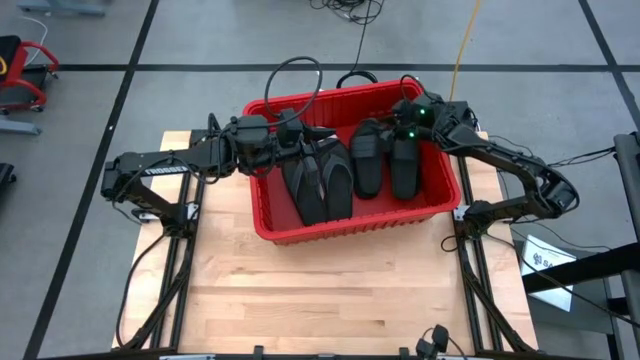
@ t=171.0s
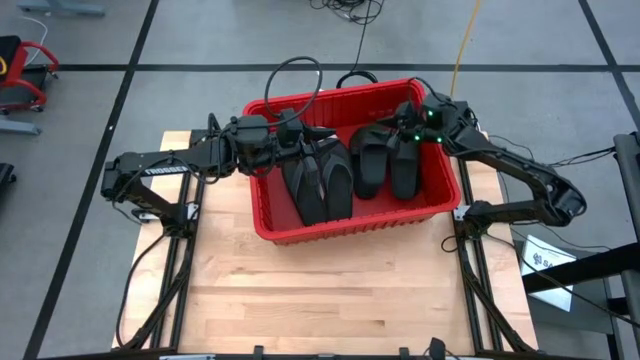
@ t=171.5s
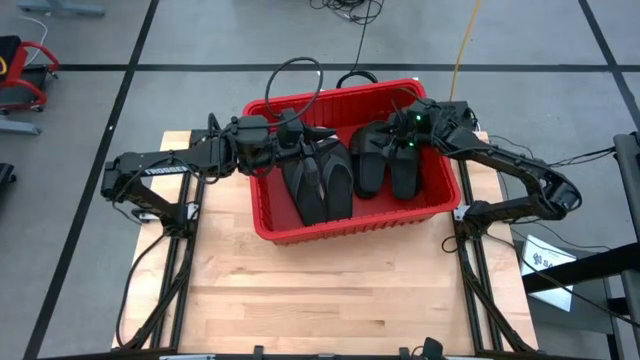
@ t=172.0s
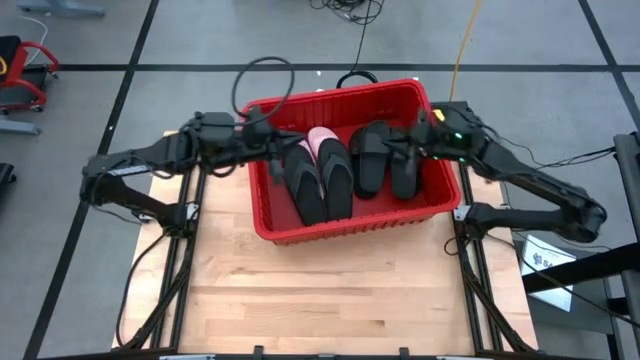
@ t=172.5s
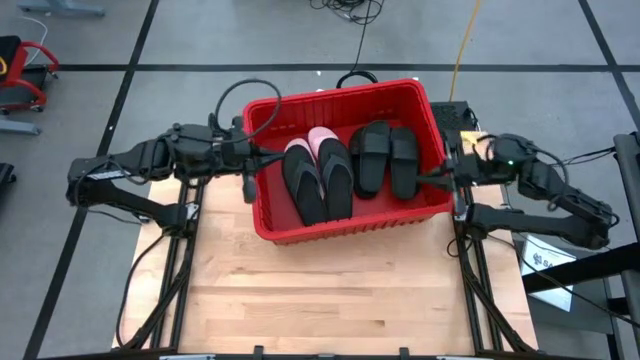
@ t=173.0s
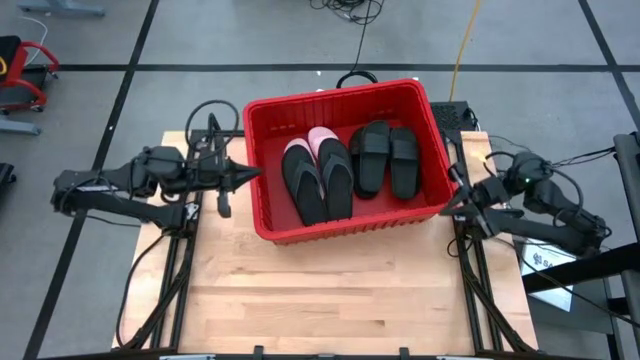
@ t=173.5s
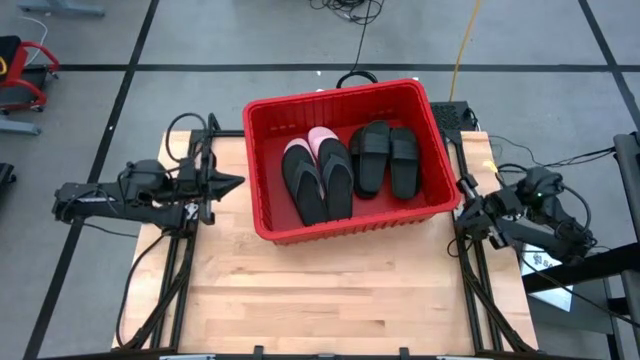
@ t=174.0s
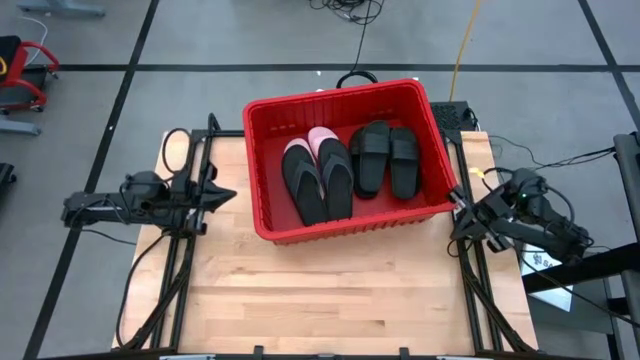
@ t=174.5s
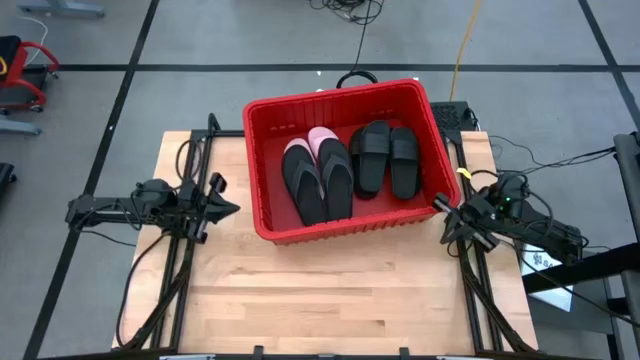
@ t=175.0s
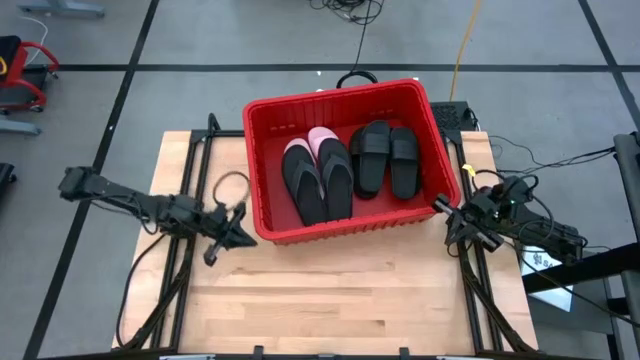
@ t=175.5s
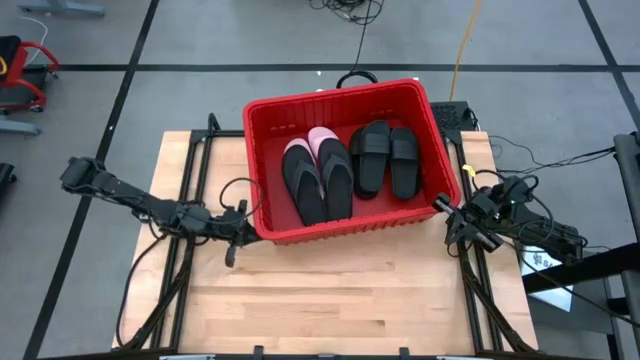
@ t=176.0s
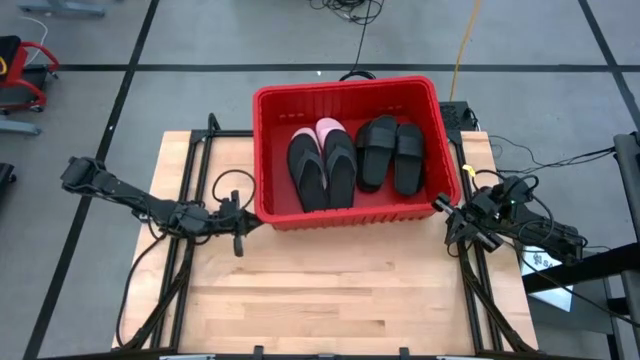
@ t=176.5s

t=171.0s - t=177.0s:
Task: Pick and place slides into bin
Adjust the red bin

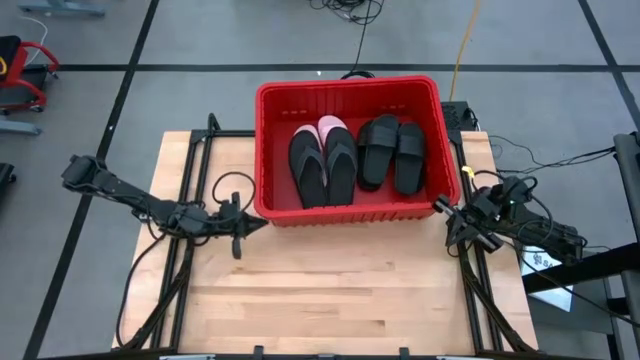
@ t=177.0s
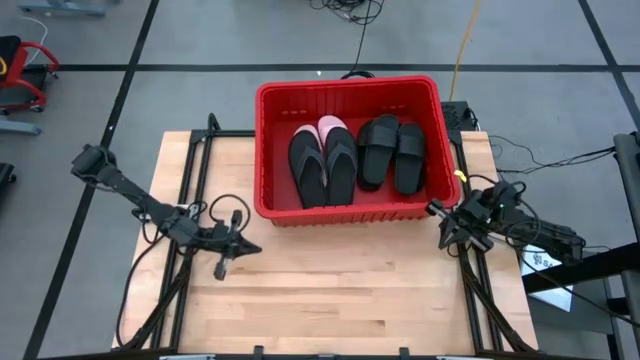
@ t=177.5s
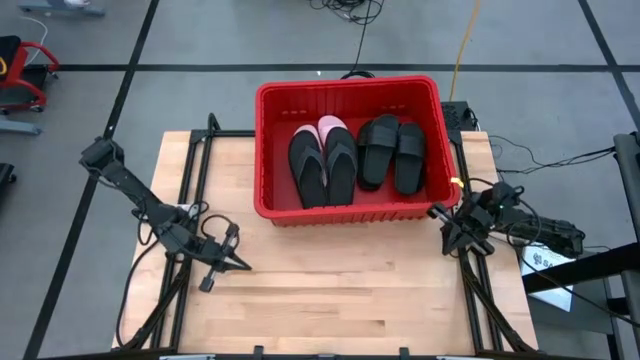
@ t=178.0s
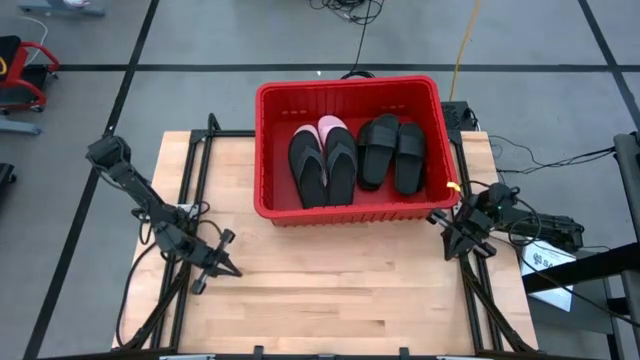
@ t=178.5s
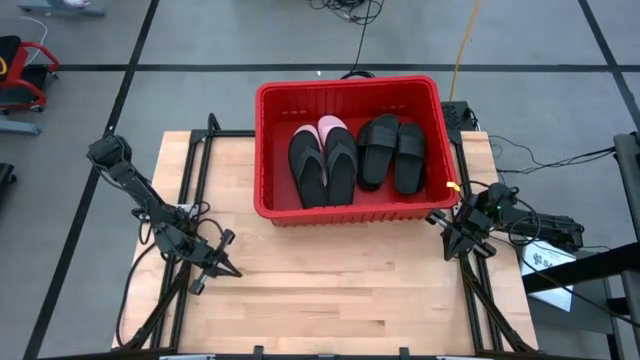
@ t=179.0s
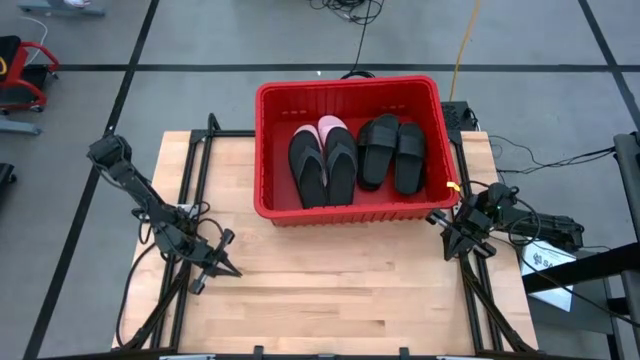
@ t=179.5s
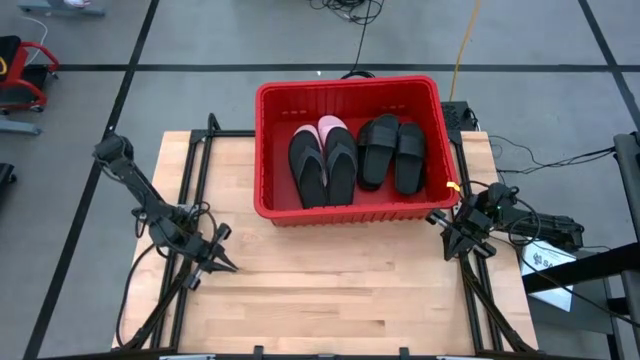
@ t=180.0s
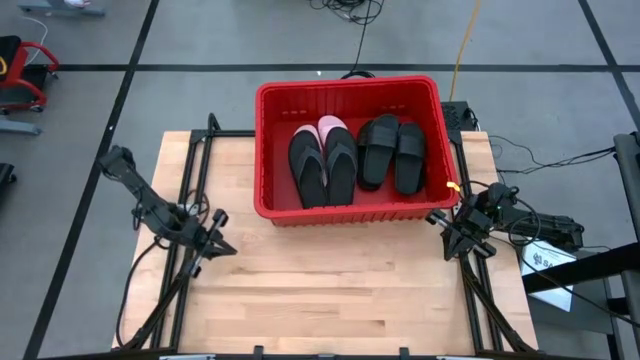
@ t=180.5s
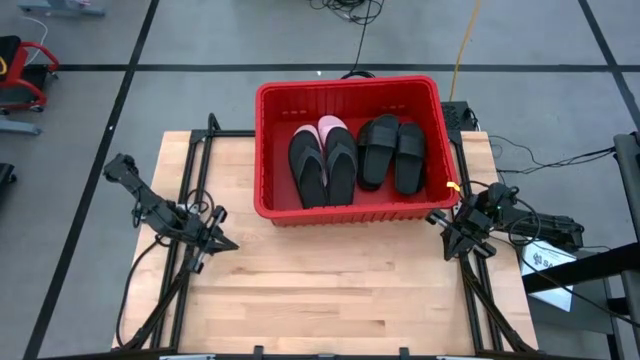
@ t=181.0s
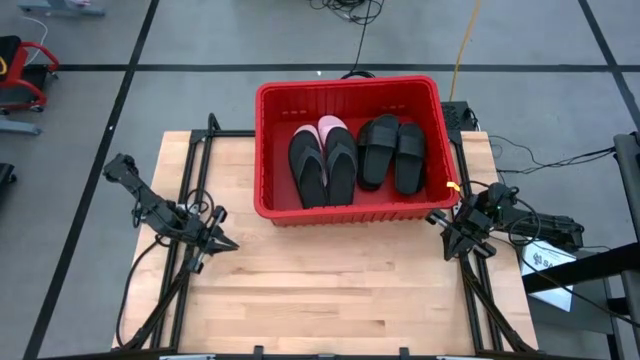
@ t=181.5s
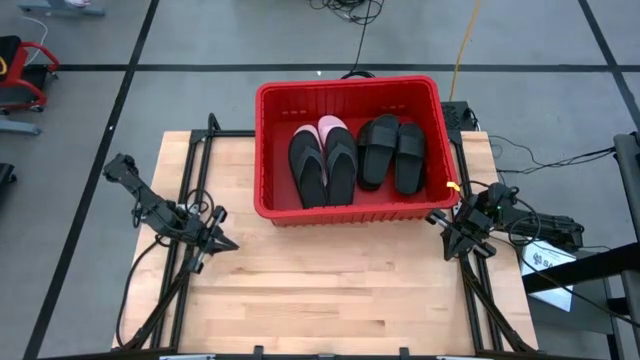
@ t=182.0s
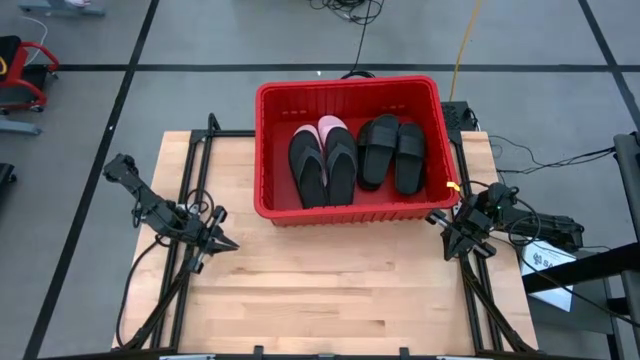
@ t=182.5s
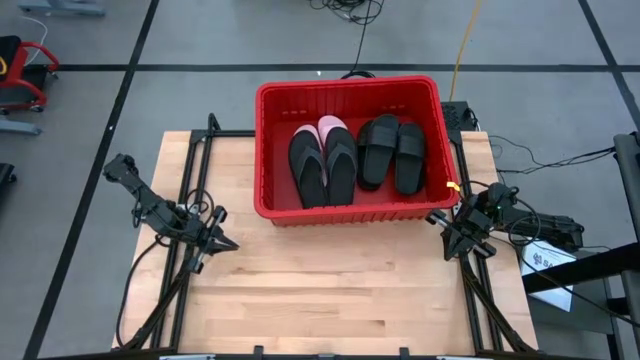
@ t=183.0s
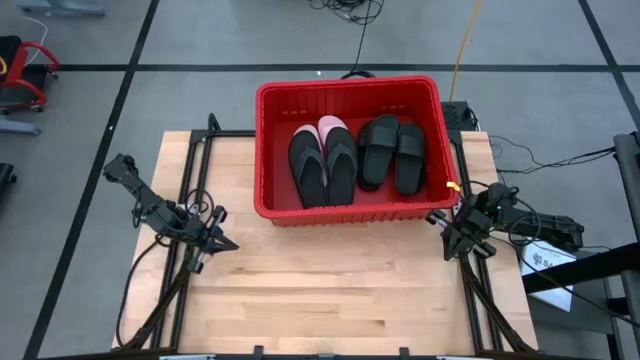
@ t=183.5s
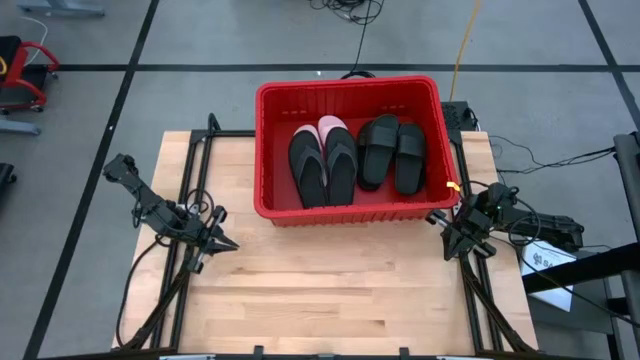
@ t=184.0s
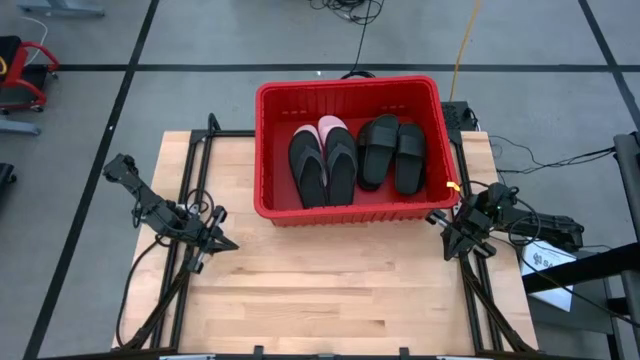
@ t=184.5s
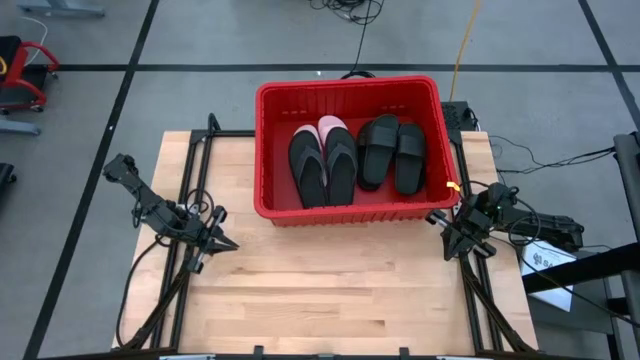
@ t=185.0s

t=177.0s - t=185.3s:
Return to Home Position

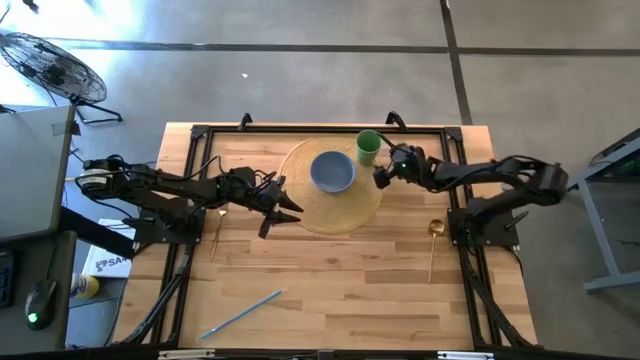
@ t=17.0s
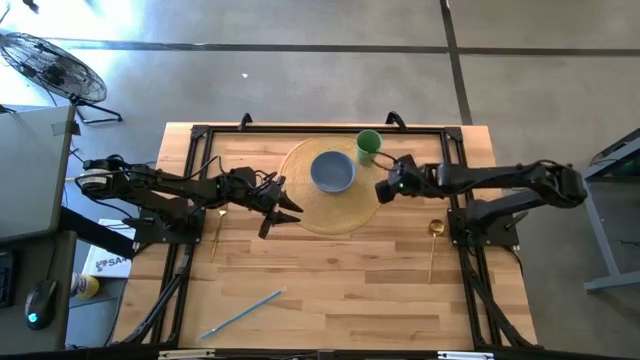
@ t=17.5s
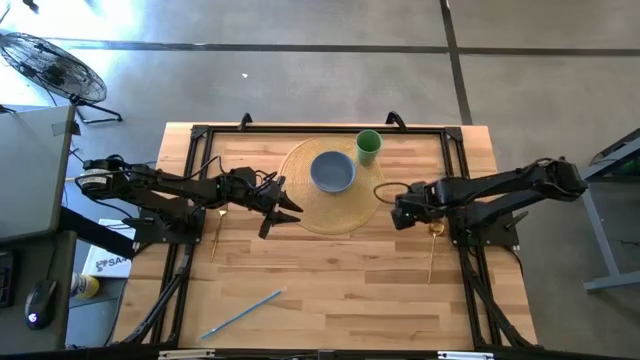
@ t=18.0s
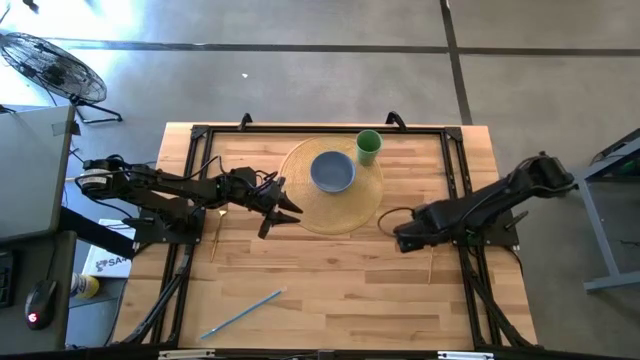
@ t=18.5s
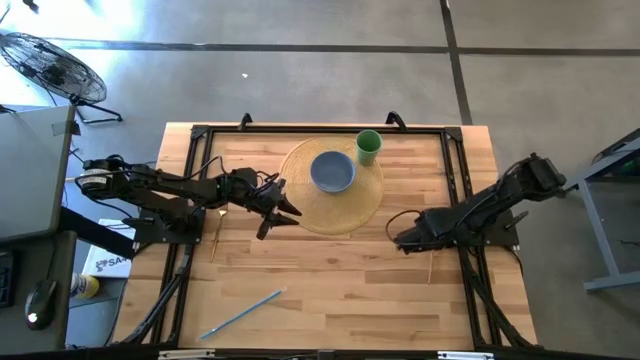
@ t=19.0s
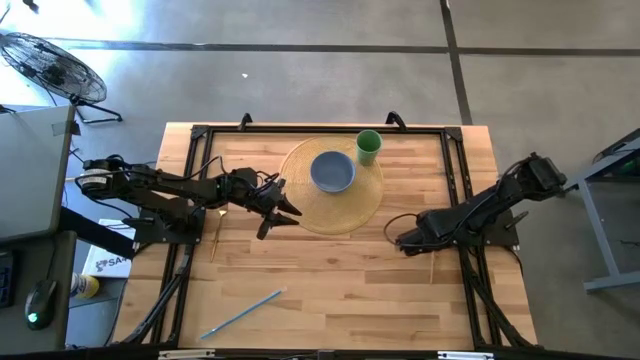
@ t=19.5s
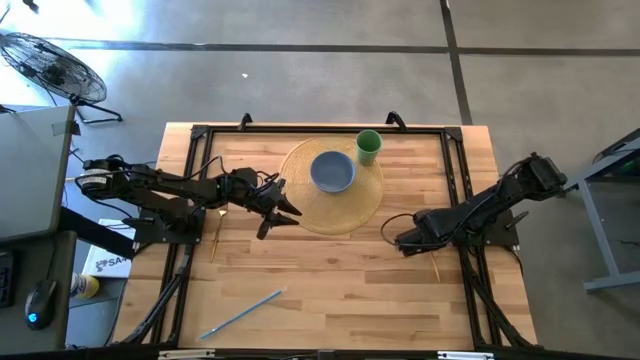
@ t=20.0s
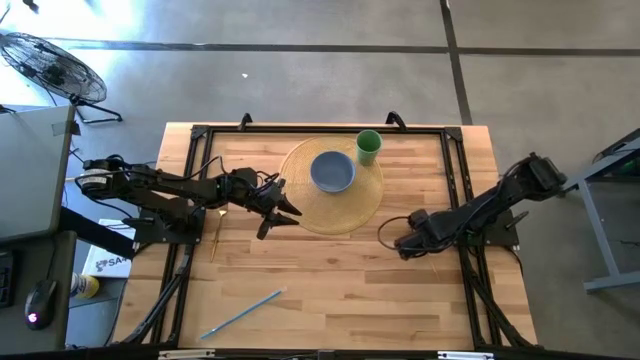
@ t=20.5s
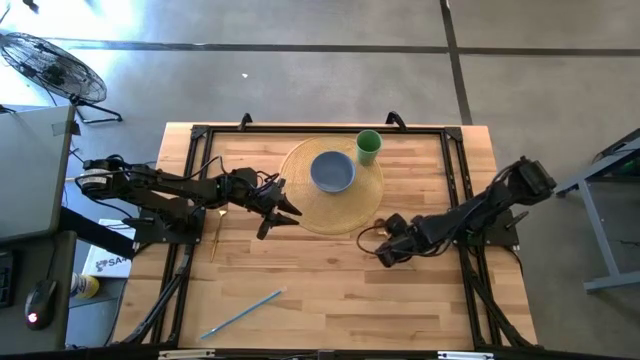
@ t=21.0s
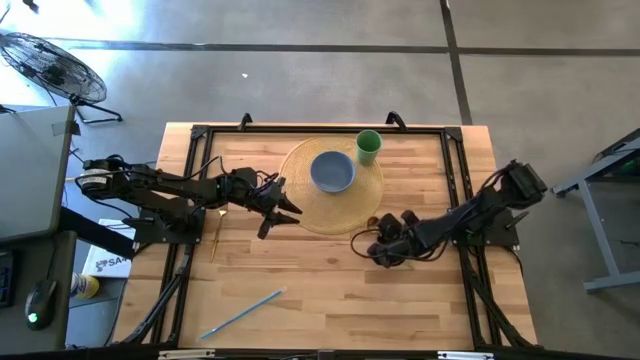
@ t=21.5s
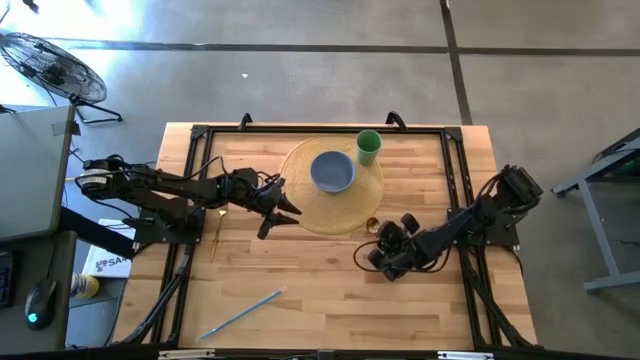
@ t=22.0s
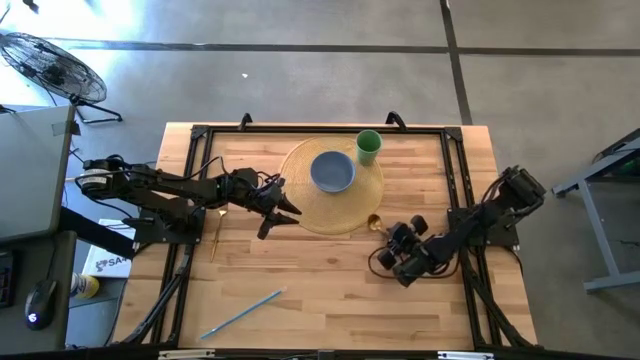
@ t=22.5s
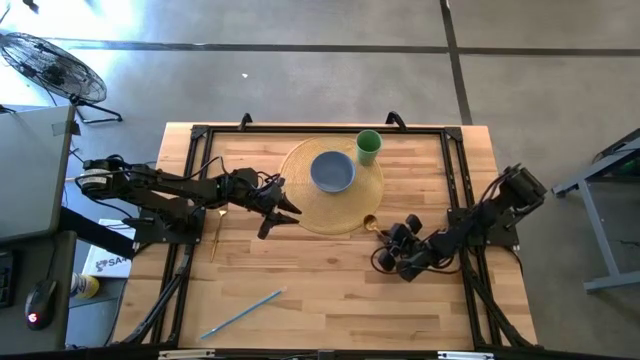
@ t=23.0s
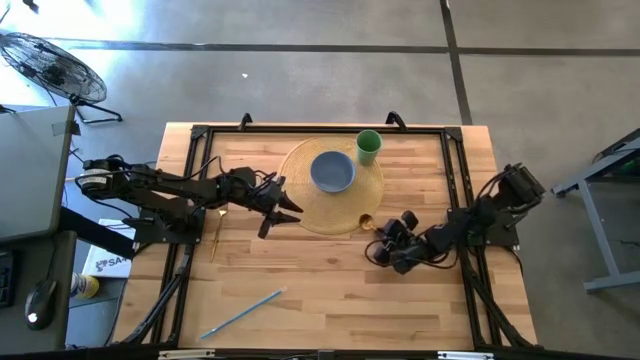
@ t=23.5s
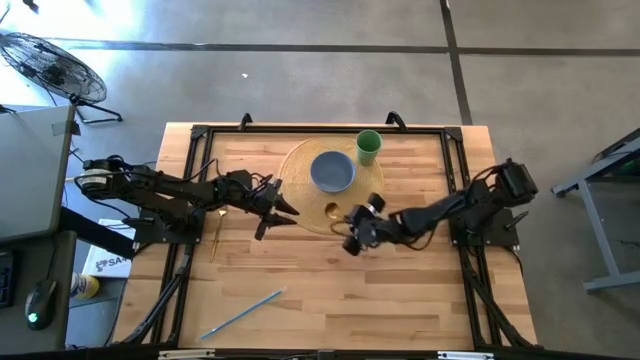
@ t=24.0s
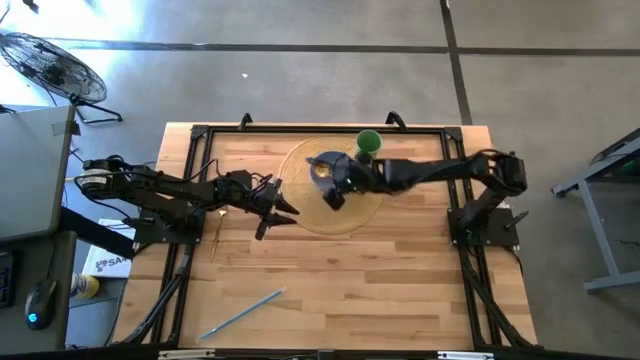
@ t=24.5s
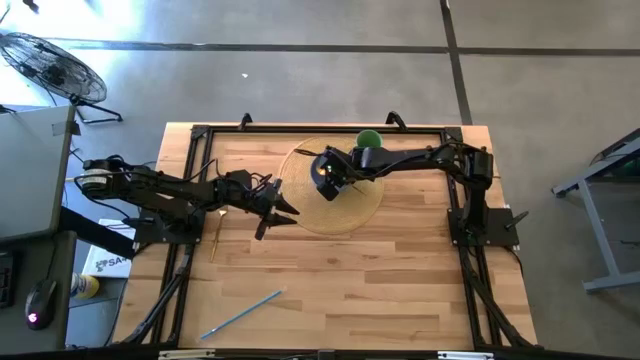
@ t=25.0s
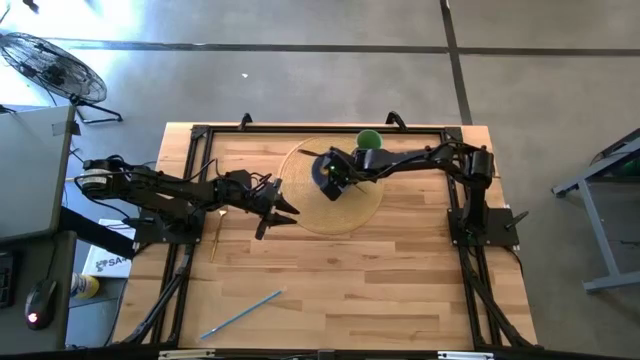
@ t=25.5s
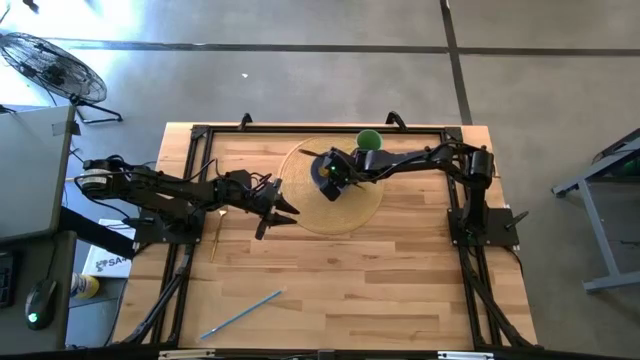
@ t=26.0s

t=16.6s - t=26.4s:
Task: Pick & Place Utensil
Put the gold spoon into the blue bowl
